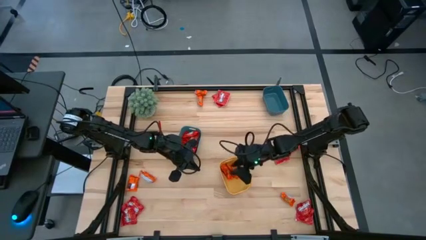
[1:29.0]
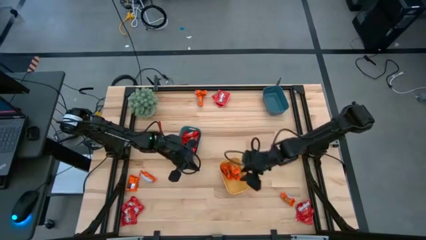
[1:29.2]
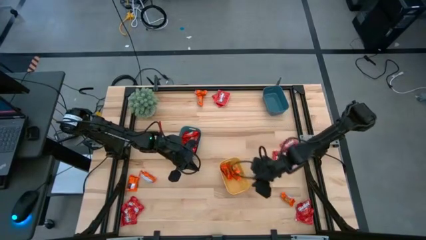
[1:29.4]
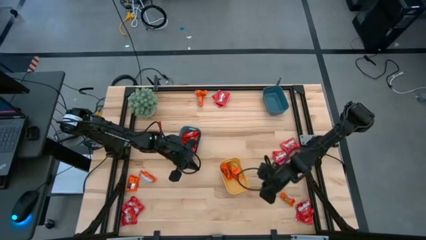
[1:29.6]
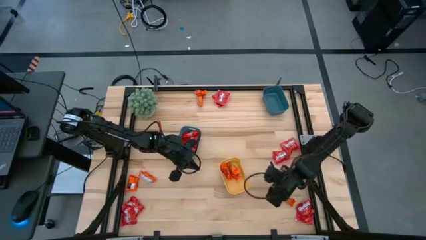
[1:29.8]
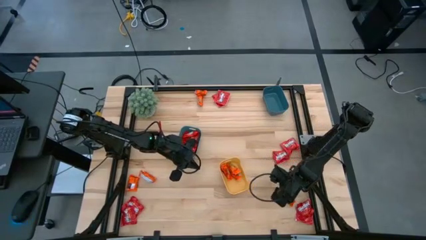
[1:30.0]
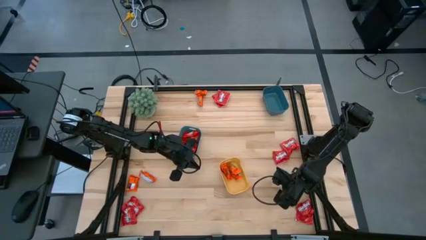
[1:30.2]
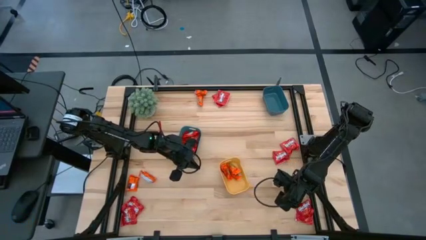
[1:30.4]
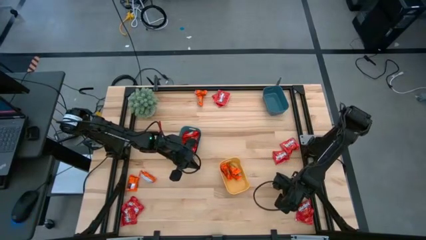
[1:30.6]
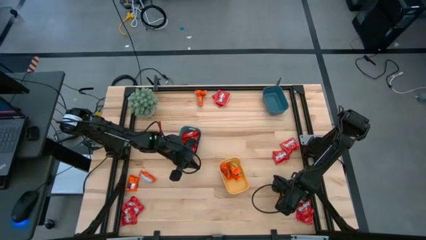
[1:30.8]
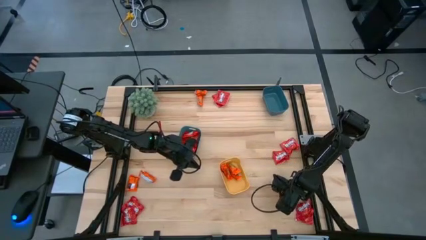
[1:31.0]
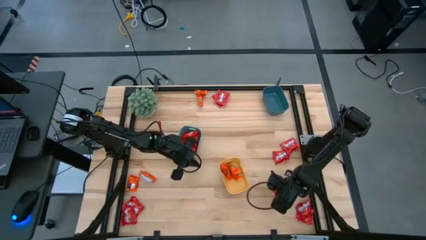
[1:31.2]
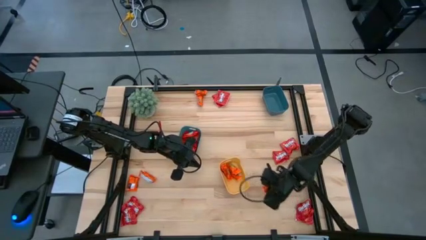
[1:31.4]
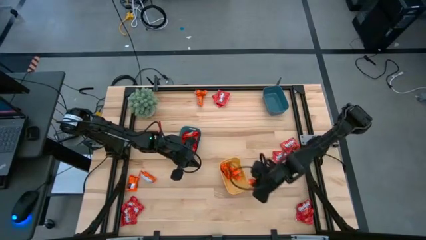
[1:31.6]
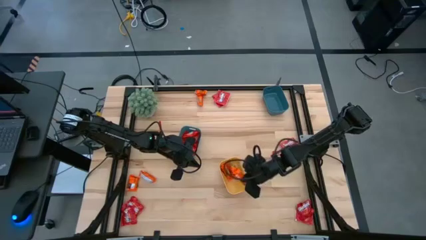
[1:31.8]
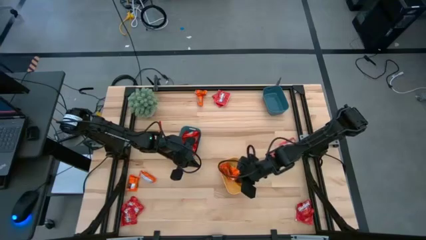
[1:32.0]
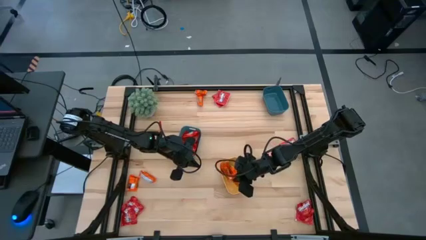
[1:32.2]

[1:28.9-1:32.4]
Task: Sort candy
Put the orange candy into the yellow bin

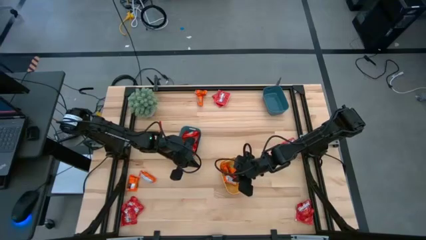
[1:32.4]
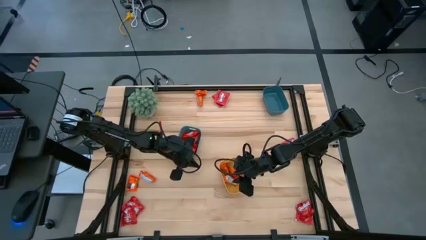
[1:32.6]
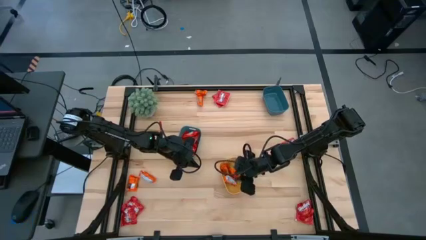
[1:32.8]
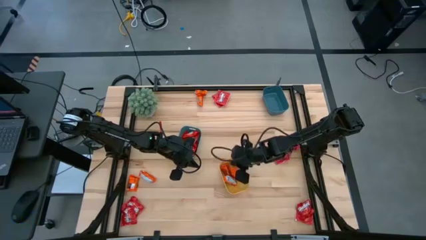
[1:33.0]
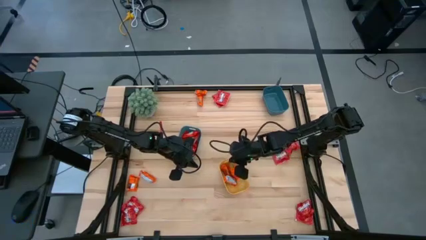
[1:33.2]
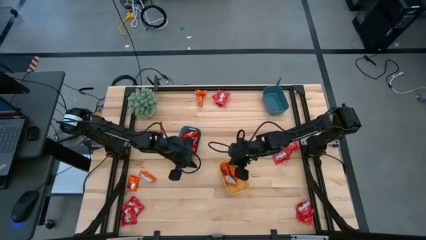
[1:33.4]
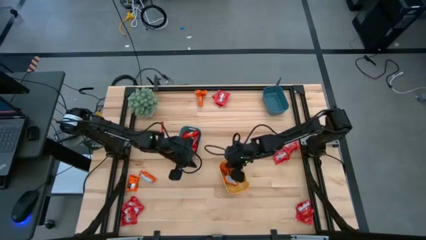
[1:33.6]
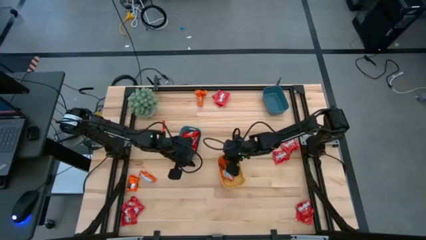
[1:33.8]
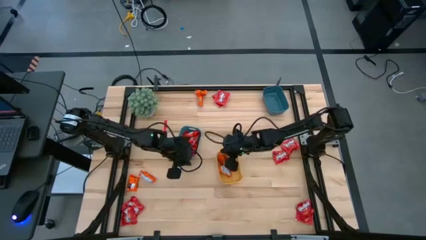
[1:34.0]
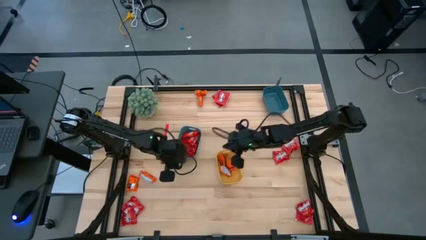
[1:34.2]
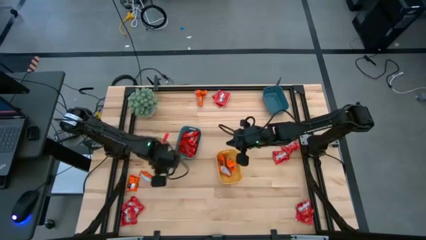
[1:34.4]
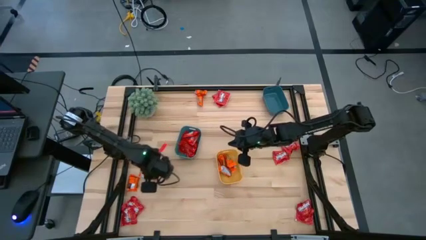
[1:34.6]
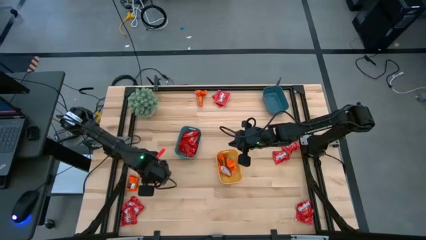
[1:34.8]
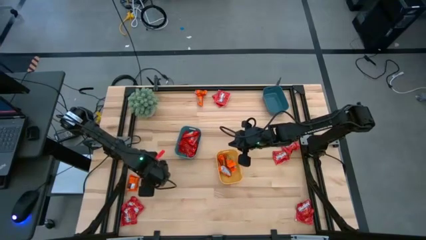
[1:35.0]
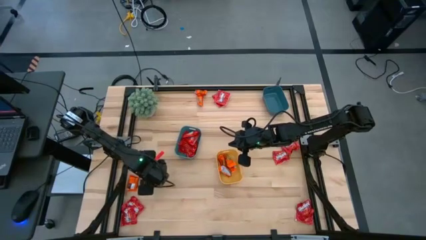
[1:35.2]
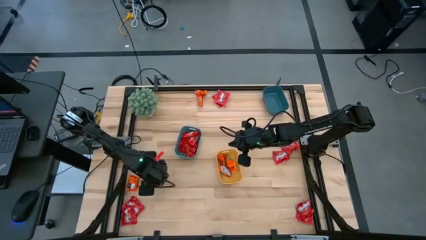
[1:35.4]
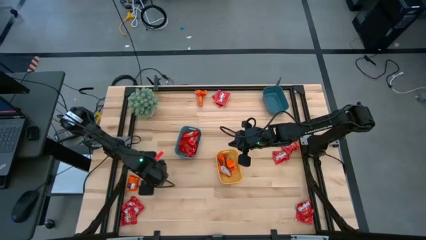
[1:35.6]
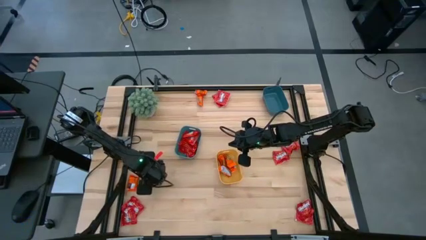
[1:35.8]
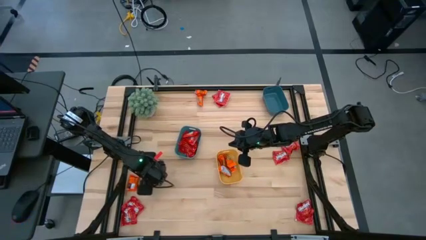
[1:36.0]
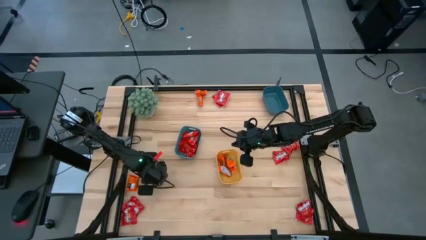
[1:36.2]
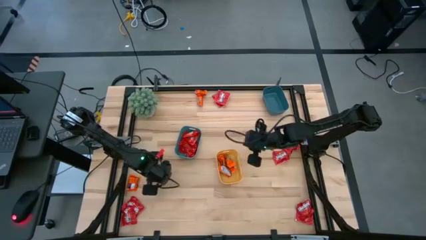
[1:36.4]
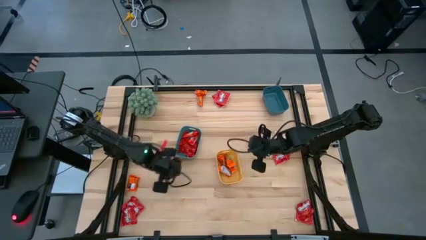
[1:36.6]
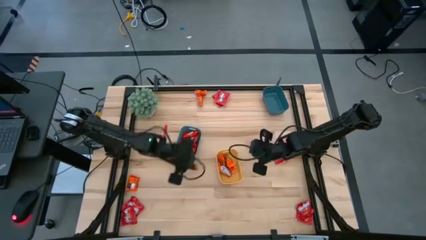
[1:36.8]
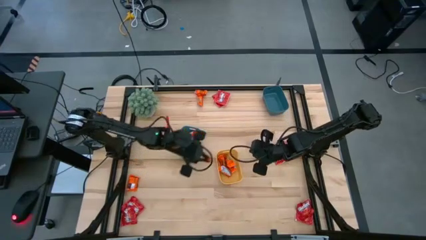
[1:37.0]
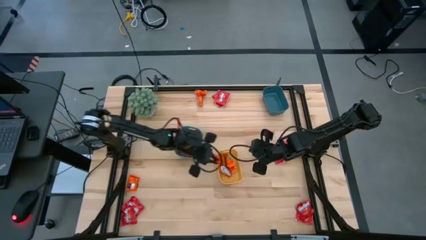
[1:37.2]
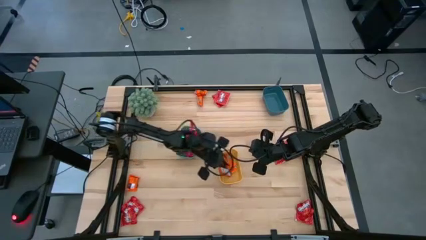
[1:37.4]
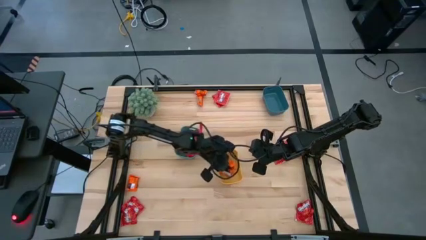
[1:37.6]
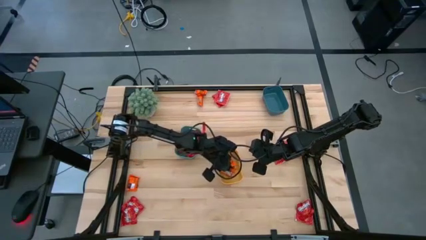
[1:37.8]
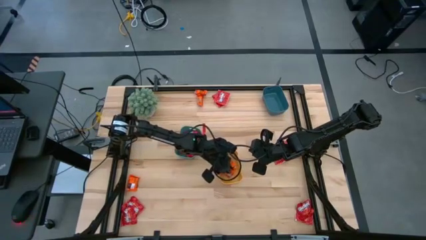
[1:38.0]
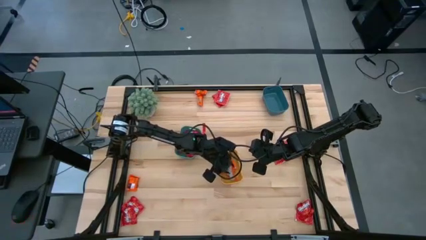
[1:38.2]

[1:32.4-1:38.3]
Put the orange candy into the yellow bin

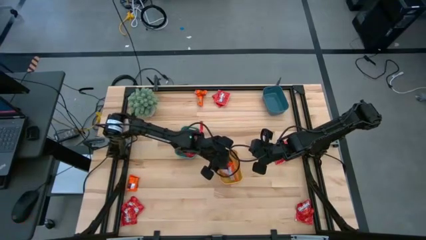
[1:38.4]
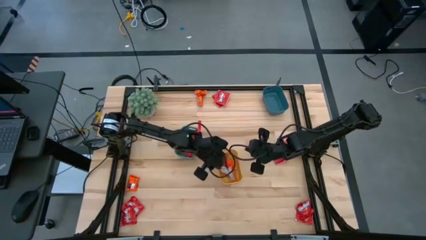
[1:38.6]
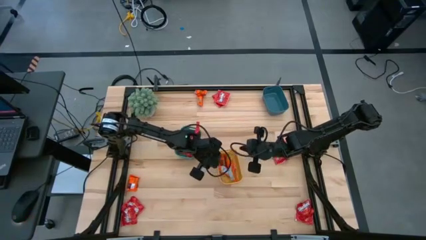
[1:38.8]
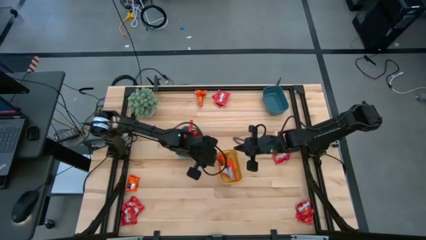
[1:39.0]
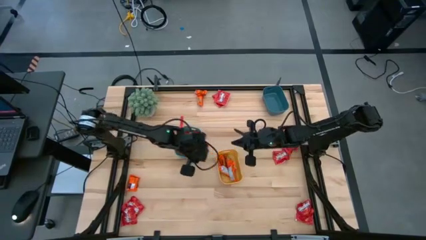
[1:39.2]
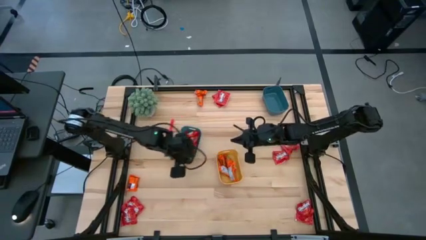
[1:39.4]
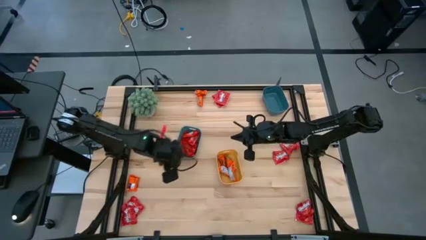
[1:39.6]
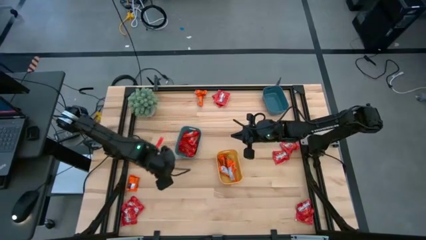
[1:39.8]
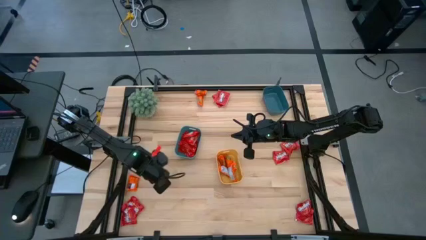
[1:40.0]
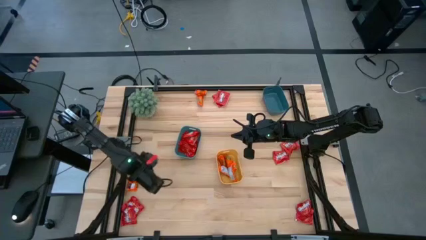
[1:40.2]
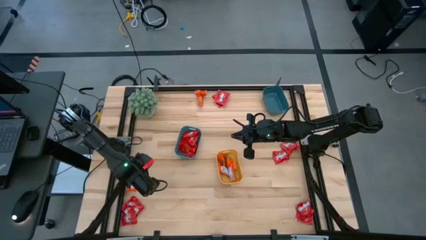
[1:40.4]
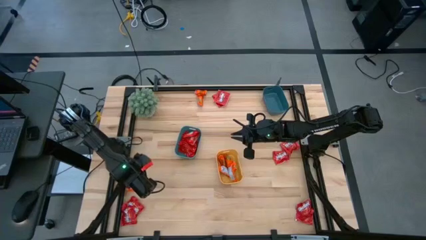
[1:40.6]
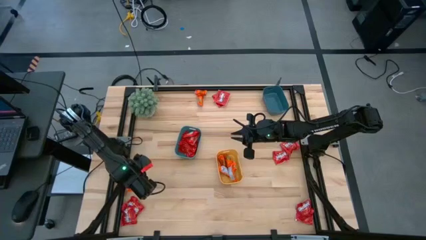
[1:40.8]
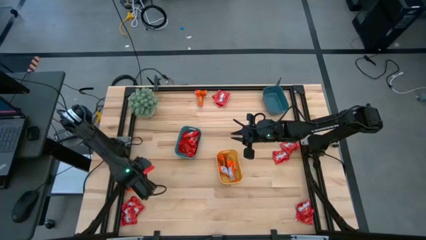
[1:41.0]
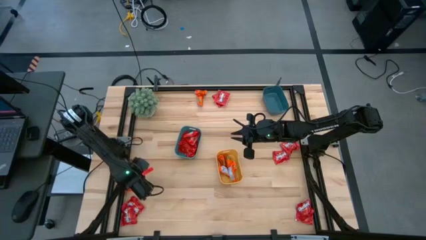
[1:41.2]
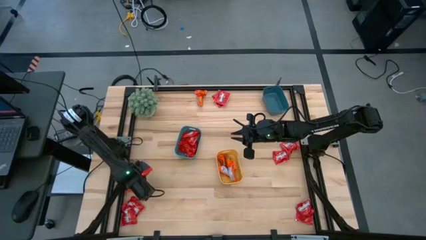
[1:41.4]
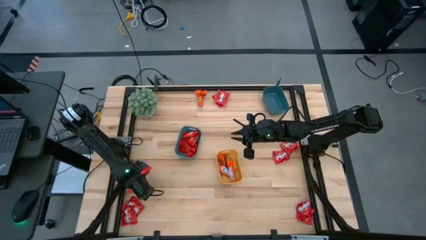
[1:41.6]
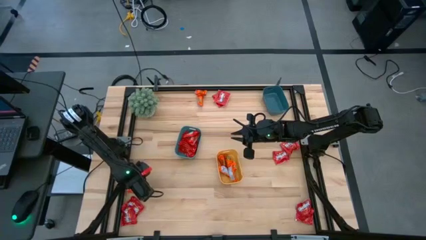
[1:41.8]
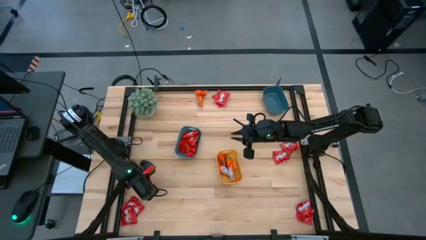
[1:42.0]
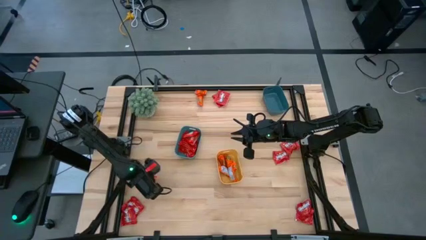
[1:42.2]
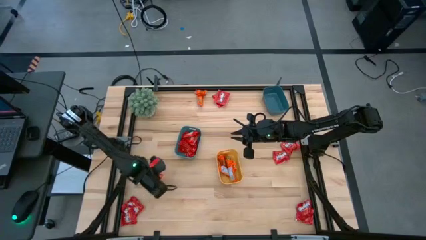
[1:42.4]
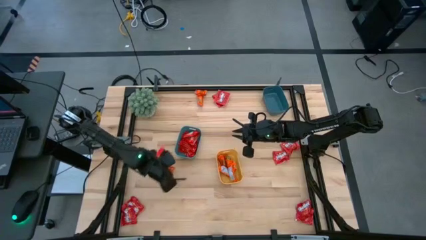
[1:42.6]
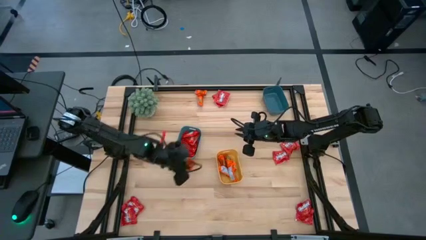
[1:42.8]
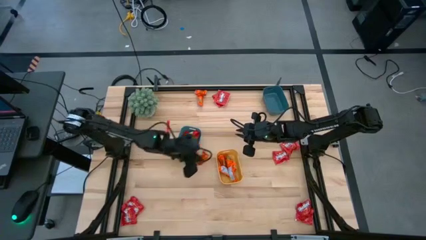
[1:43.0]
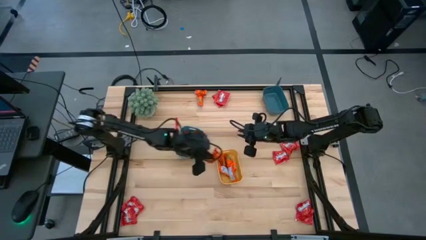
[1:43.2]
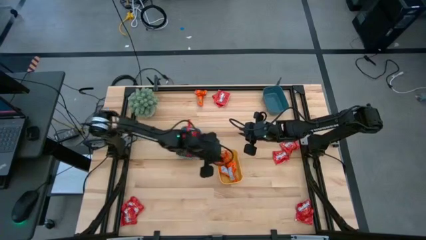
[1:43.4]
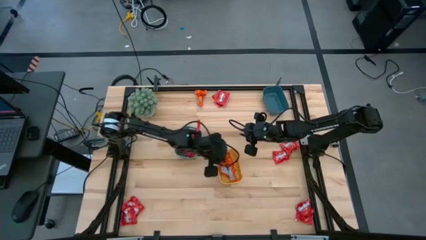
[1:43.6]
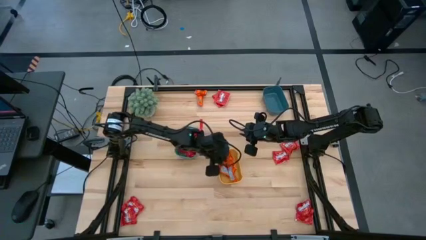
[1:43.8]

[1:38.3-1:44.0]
Put the orange candy into the yellow bin

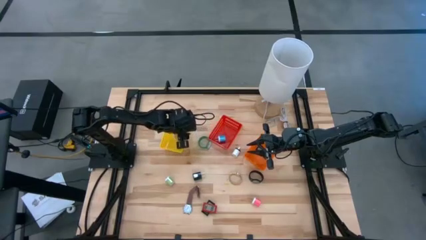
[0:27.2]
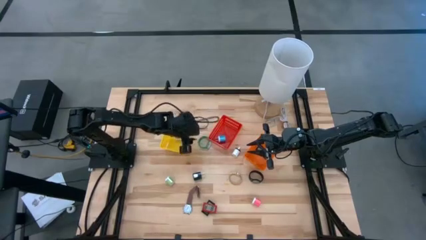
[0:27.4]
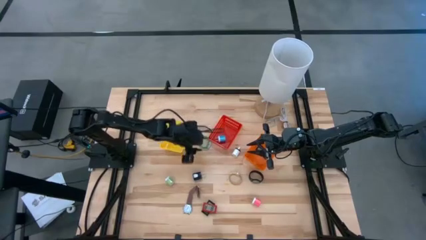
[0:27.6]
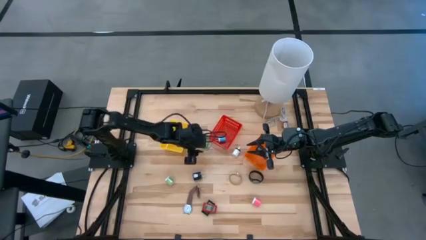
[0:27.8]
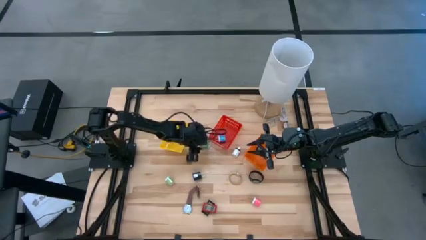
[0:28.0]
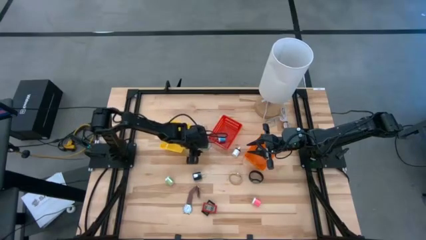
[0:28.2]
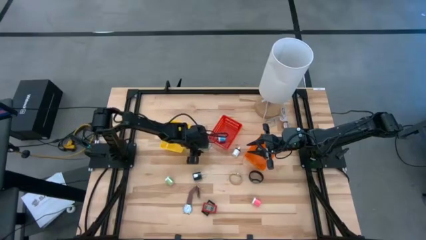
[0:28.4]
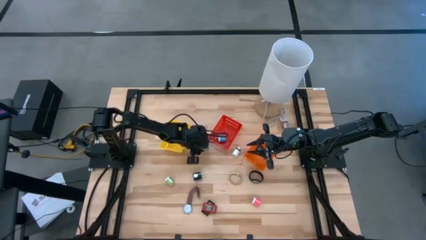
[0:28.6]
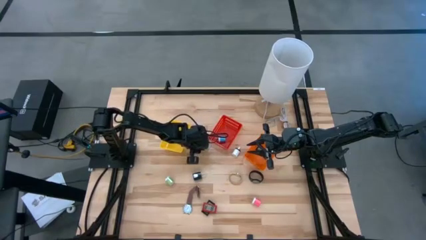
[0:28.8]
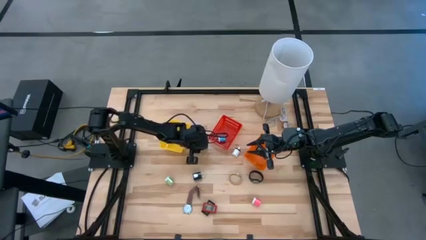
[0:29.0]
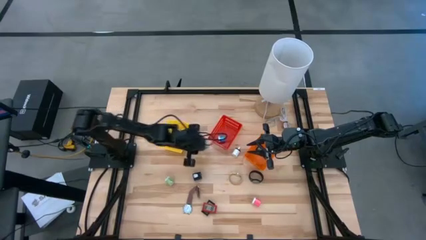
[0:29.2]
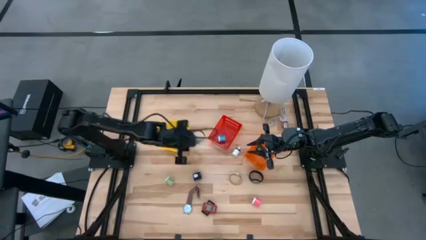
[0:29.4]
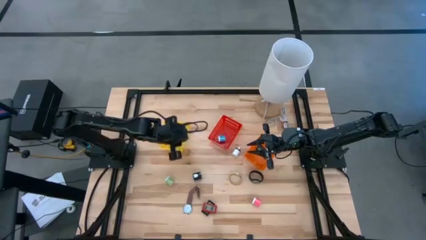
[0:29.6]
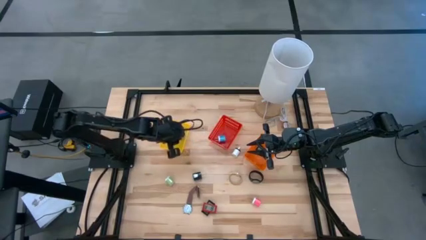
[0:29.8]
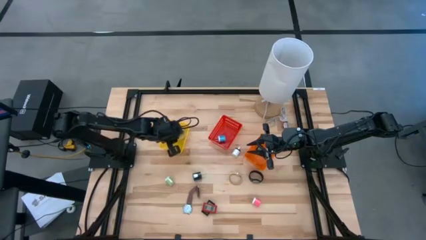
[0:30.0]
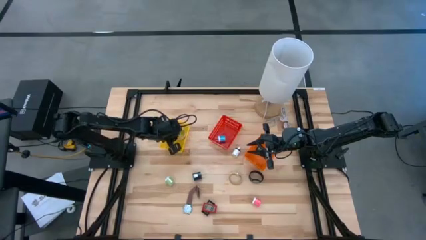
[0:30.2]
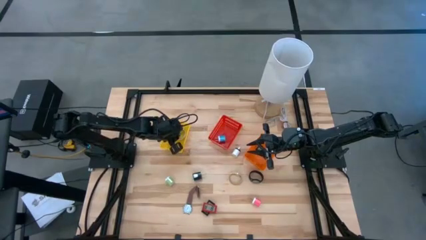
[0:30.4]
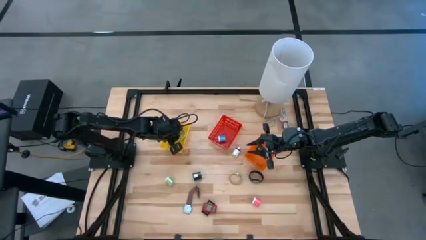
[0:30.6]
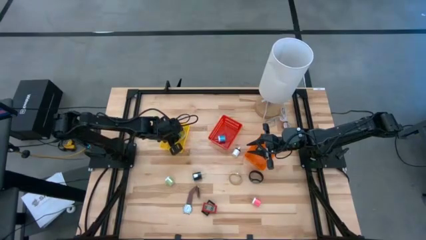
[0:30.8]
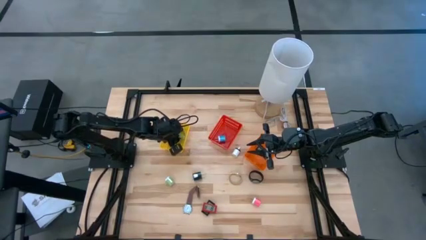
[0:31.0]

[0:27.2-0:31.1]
Task: Pick & Place Office items
Put the green watch into the yellow bin
